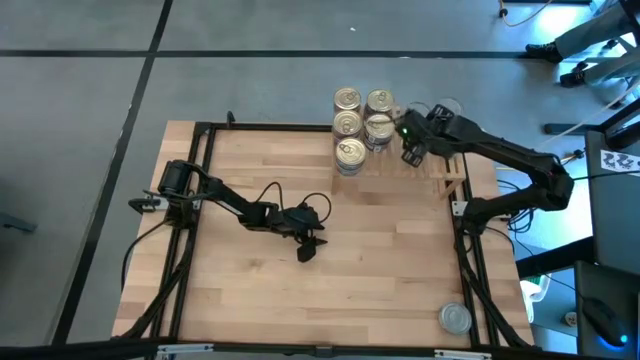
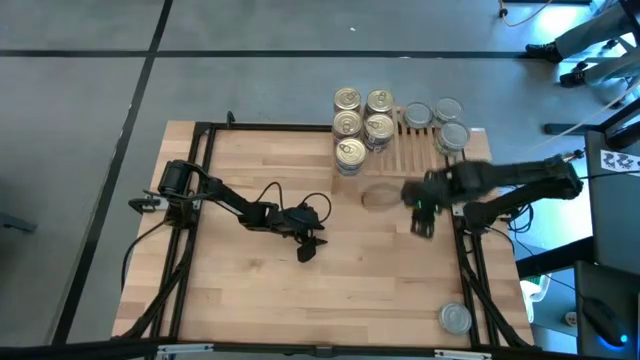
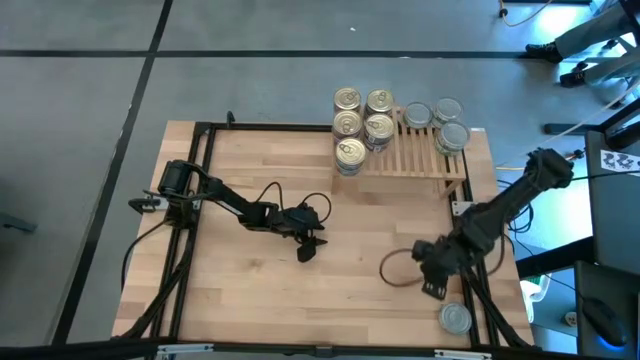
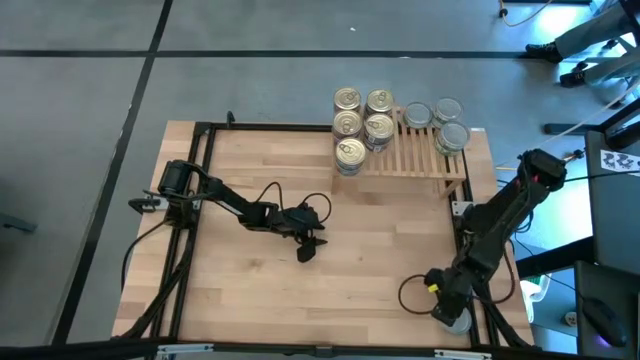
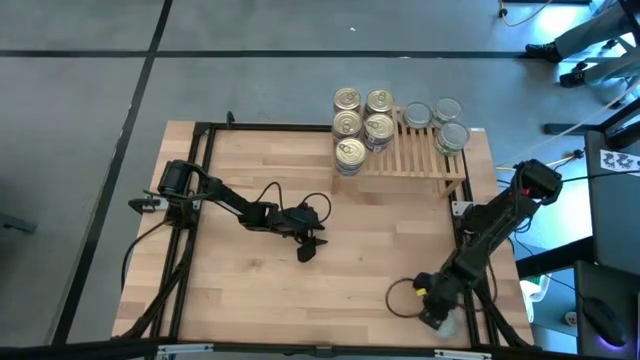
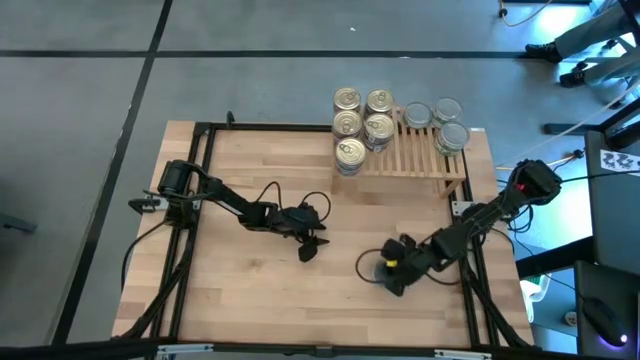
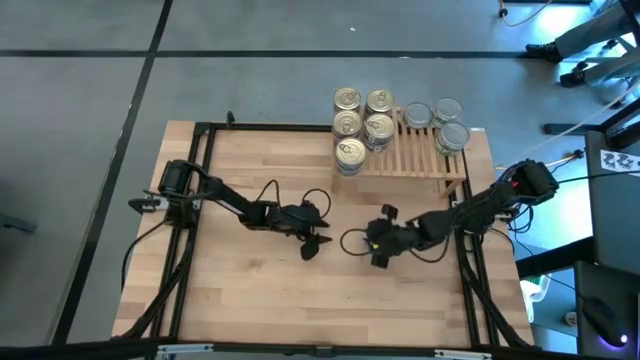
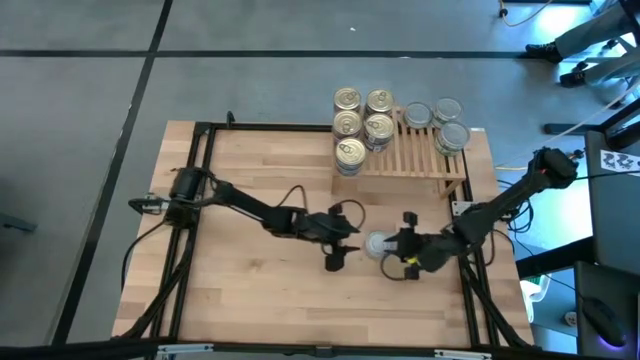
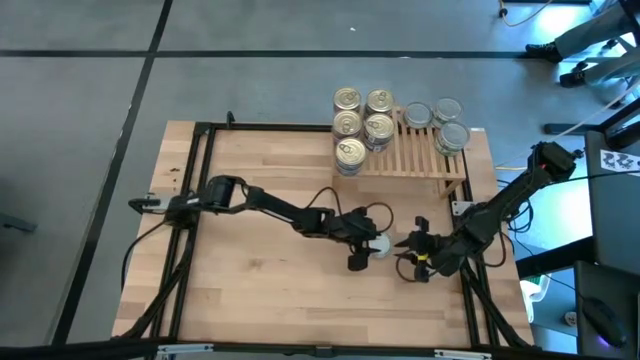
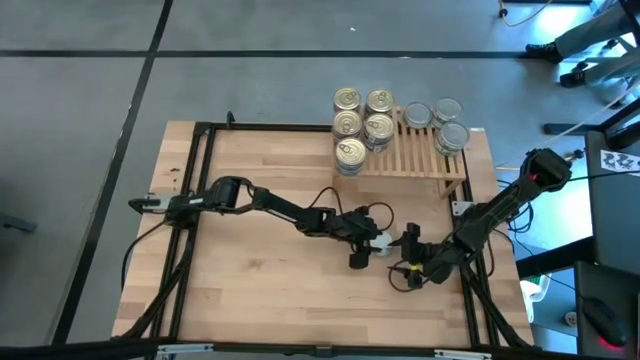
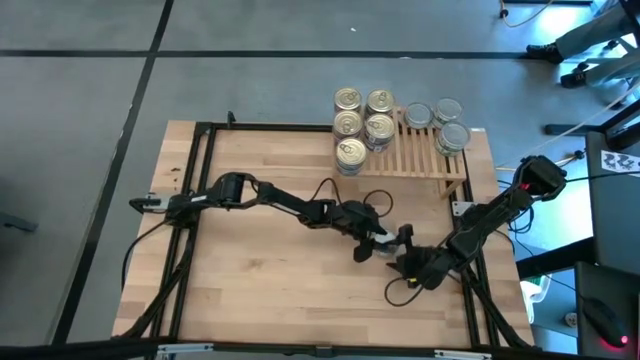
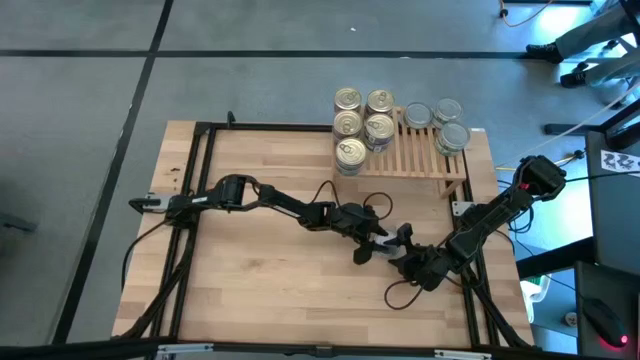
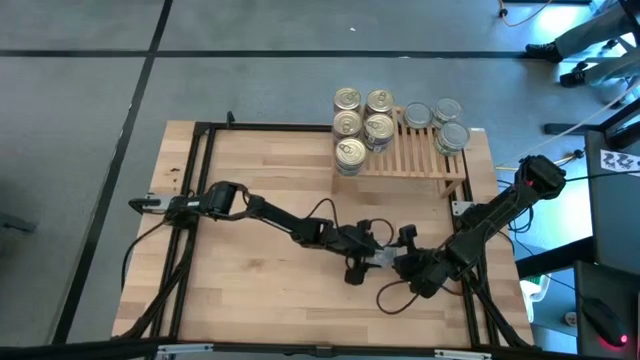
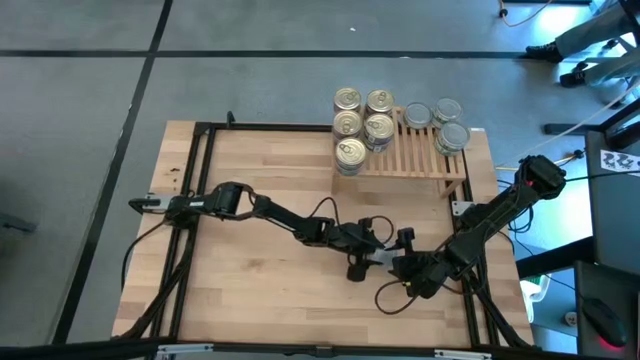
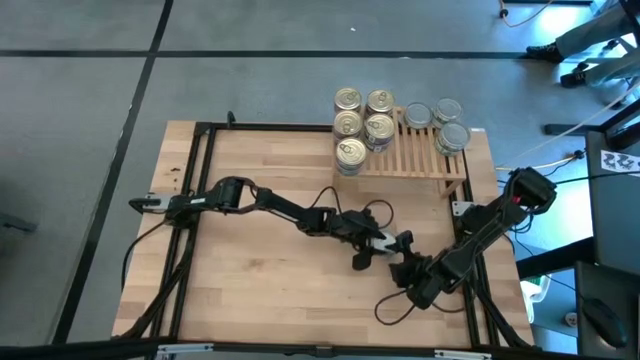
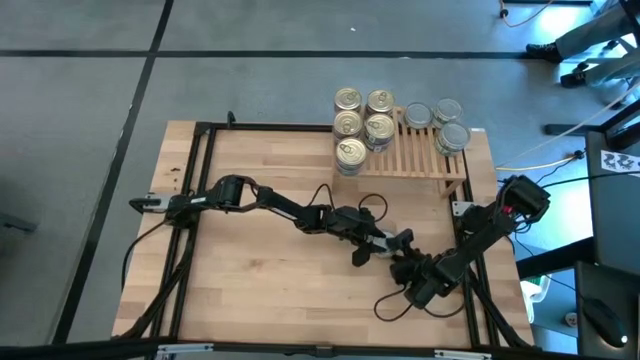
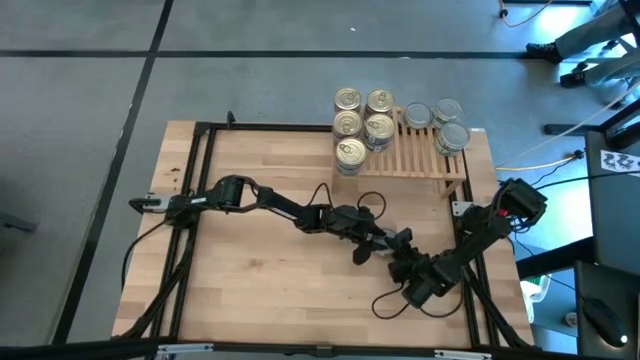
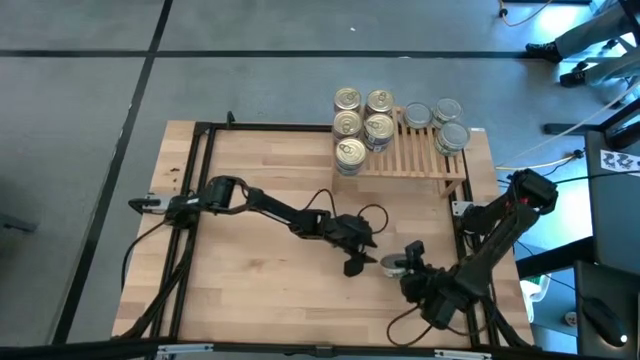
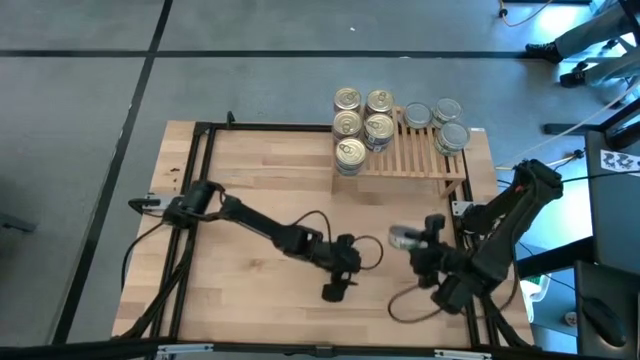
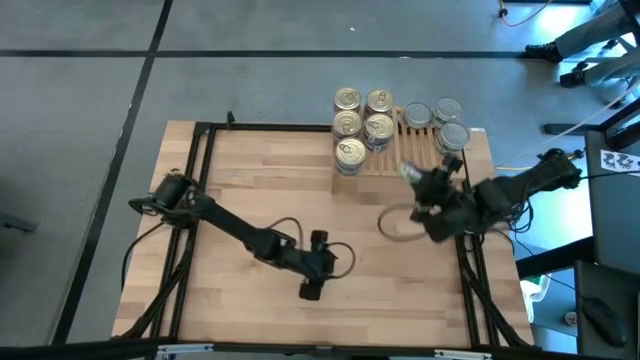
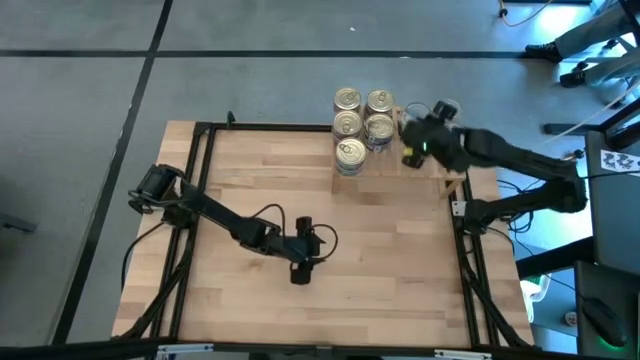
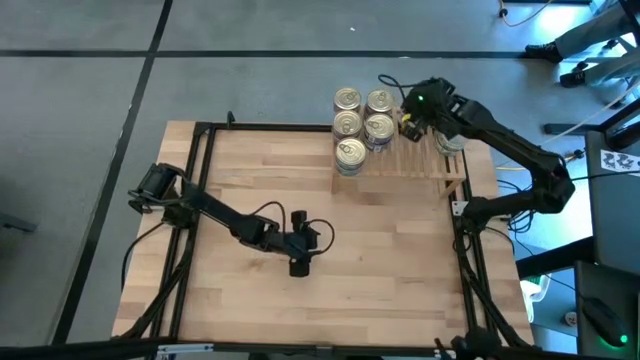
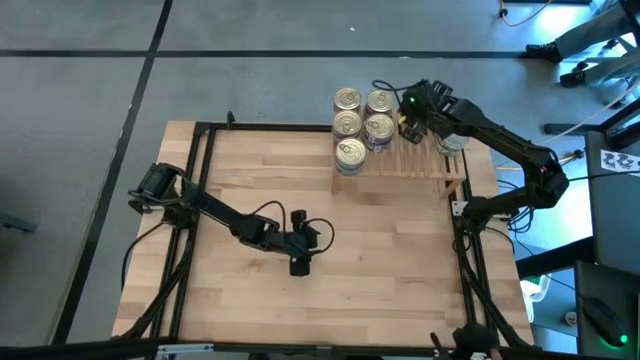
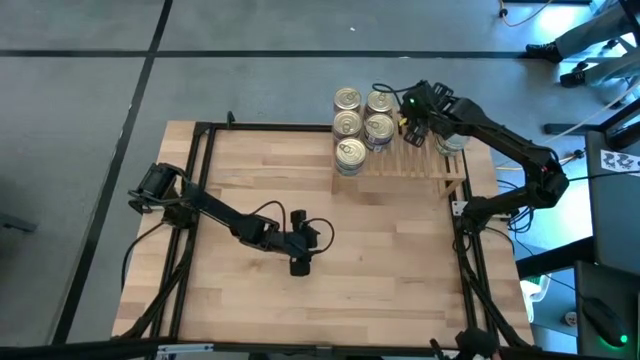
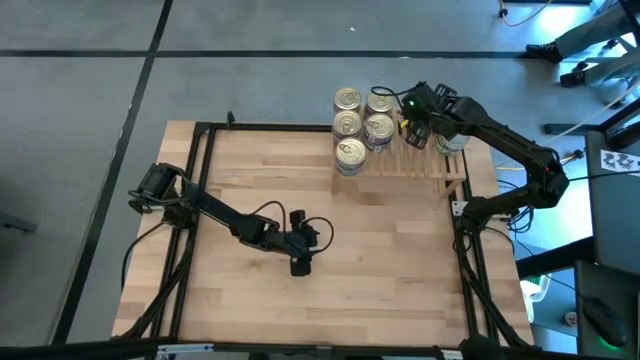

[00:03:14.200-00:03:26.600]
Task: Stack canned seafood by type on shelf
Stack the green tuna can on top of the green tuna can on the shelf

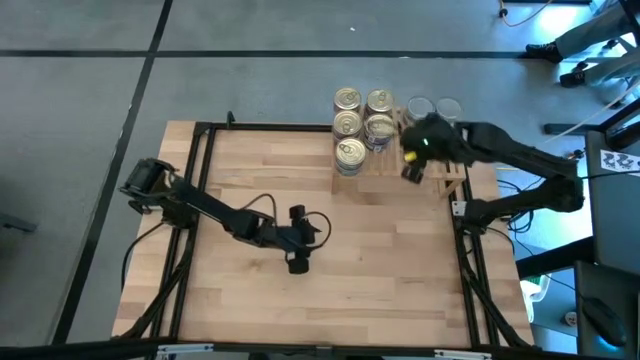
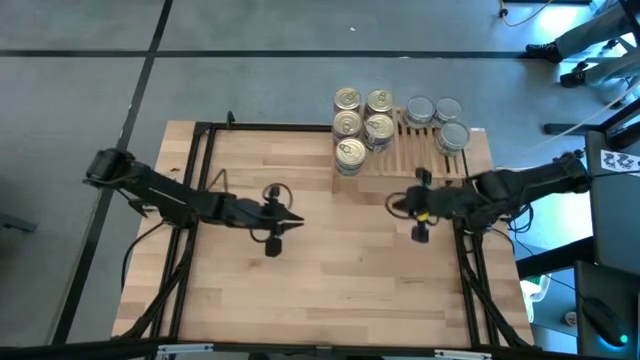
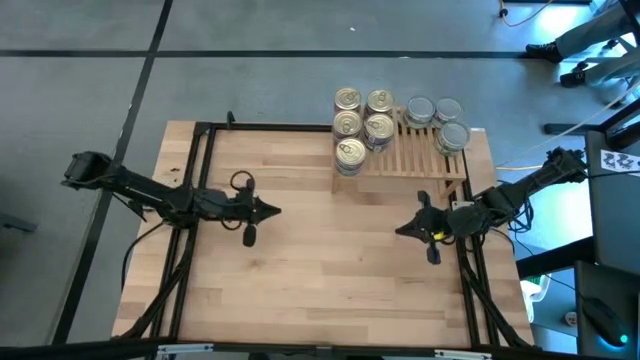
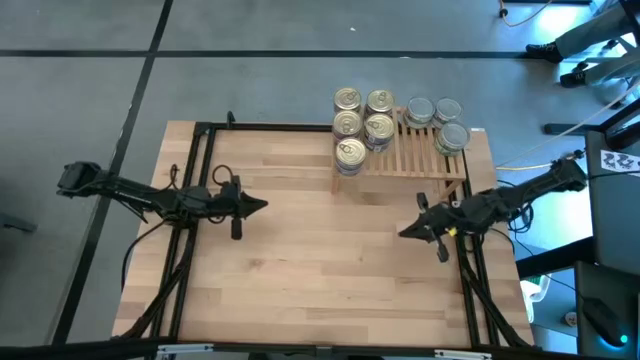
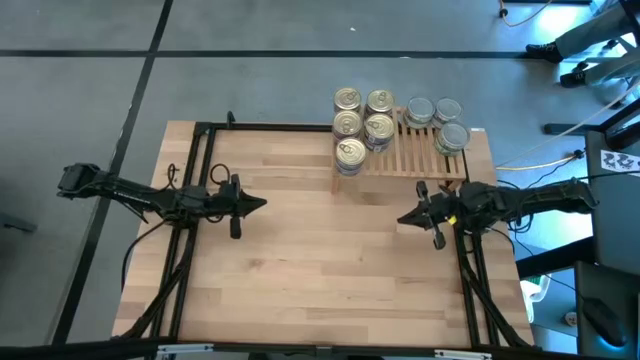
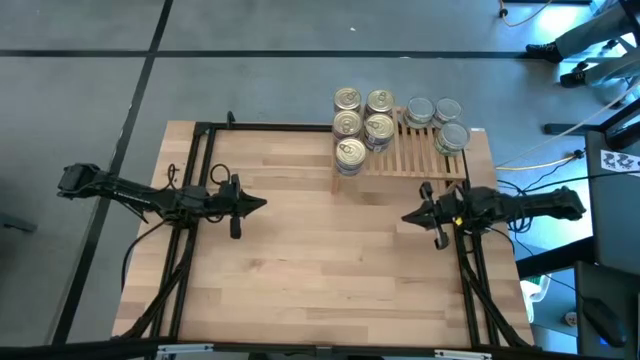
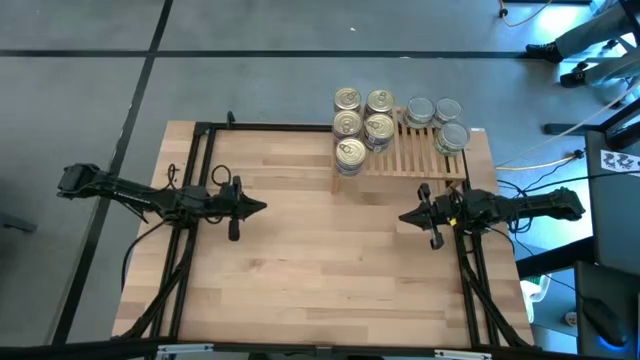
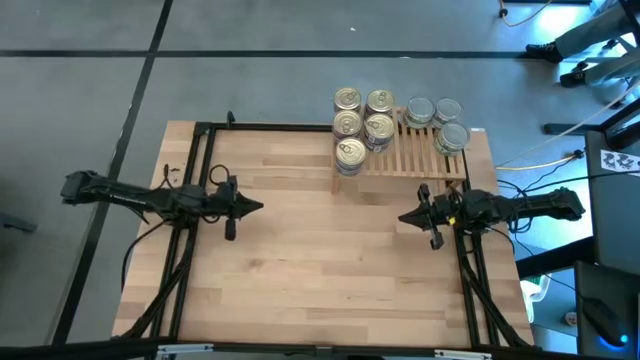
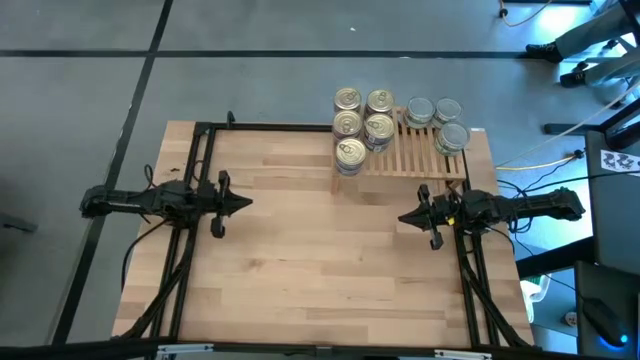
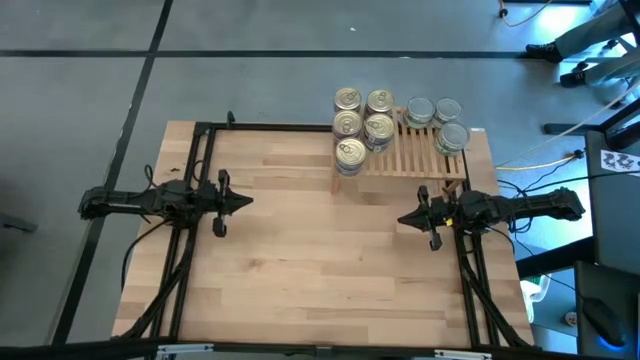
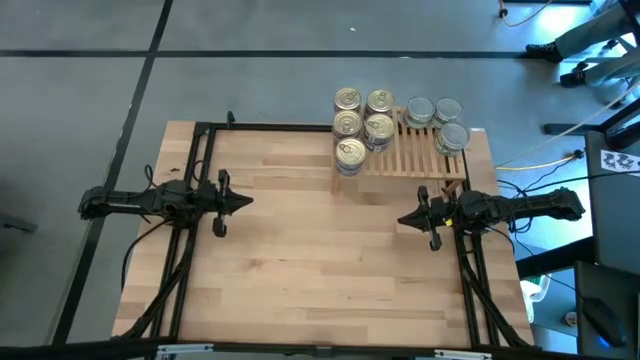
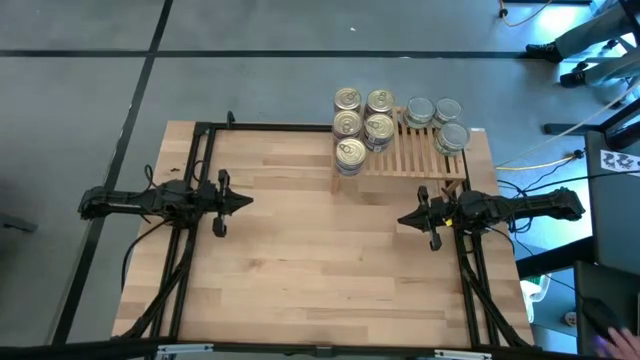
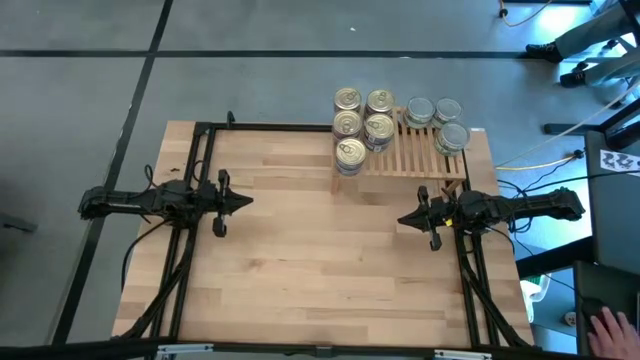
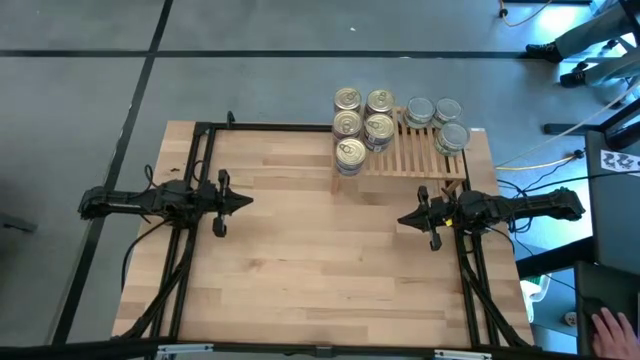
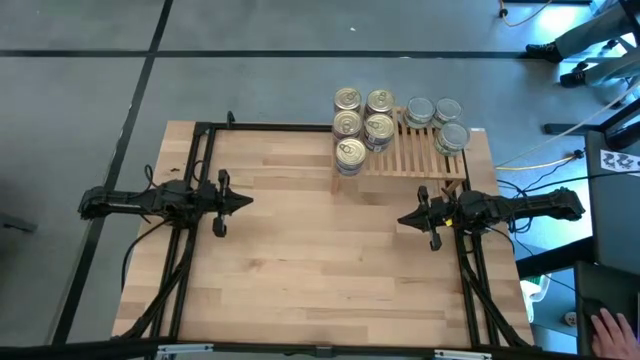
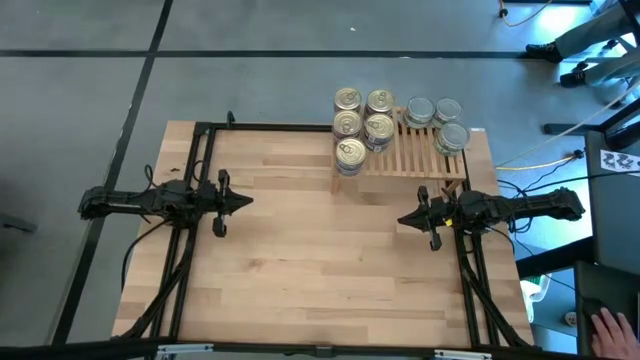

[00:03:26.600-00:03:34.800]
Return to Home Position
